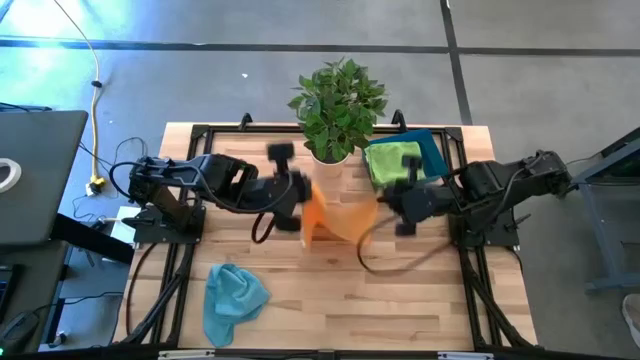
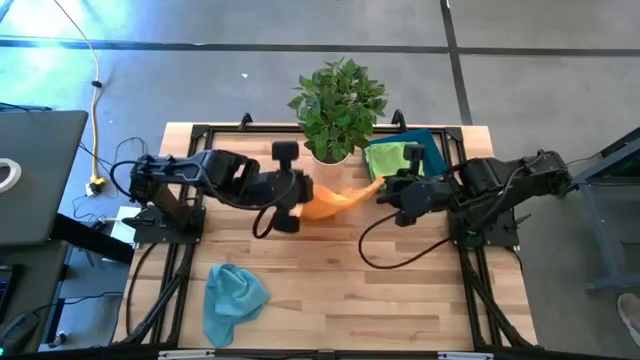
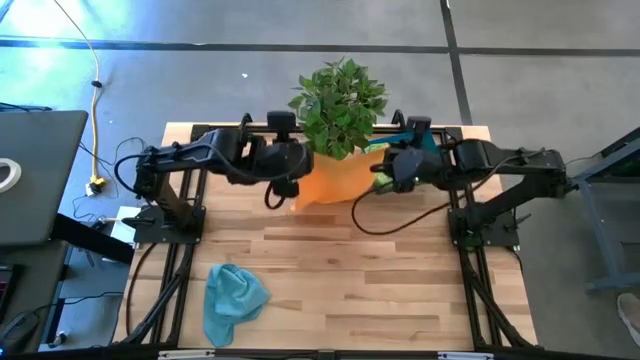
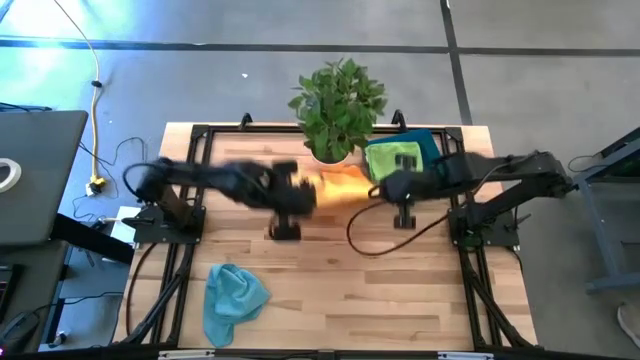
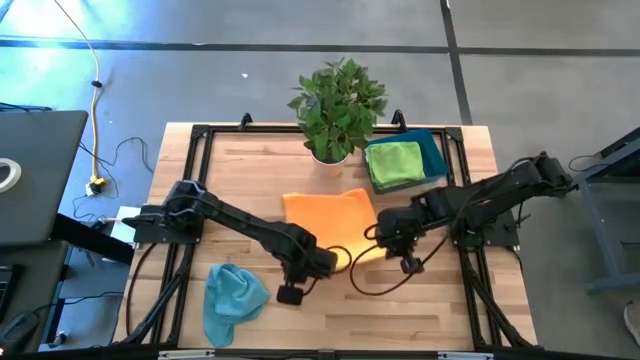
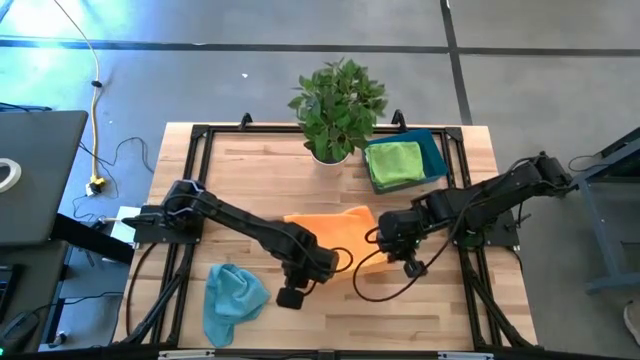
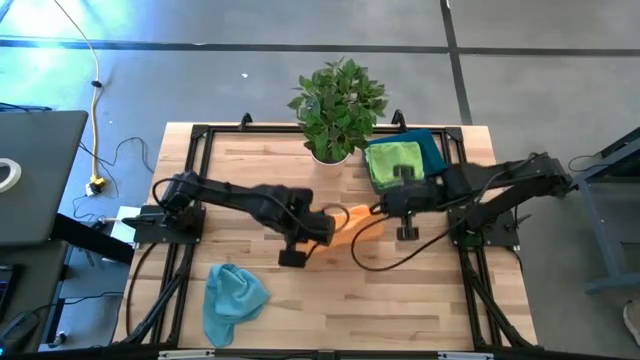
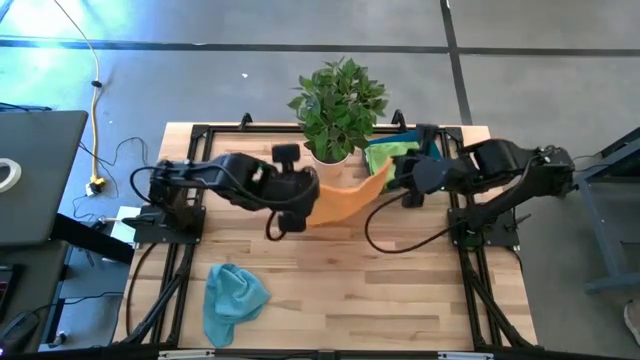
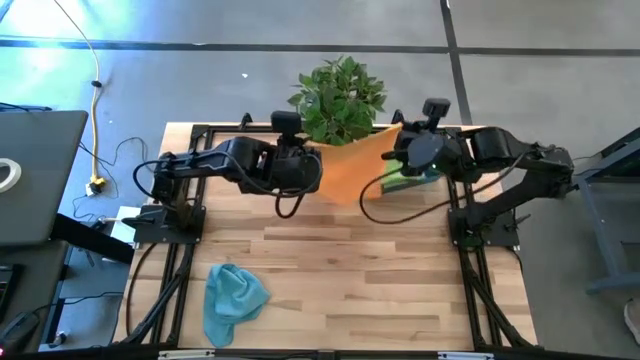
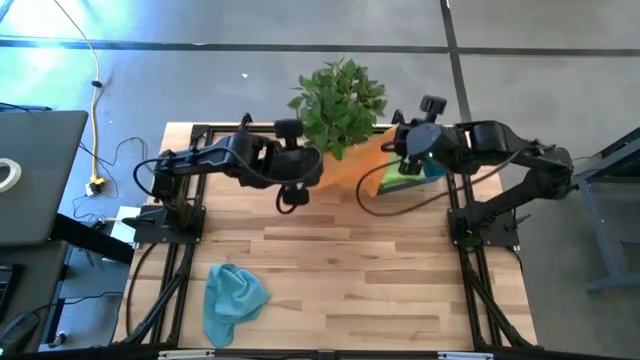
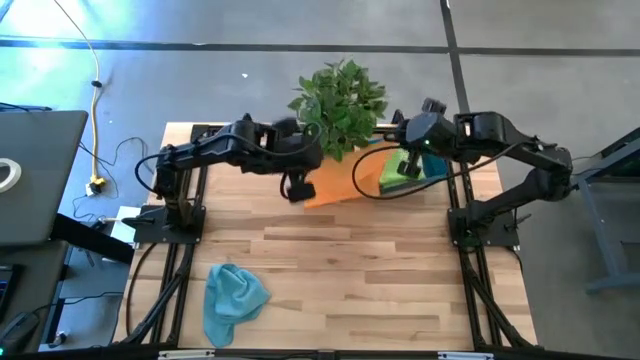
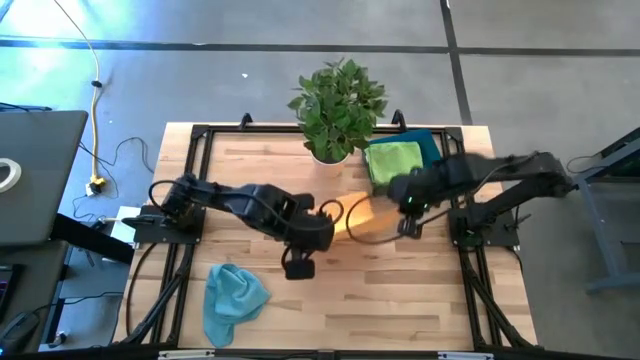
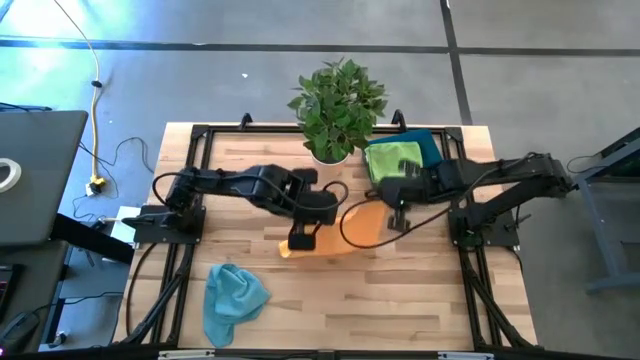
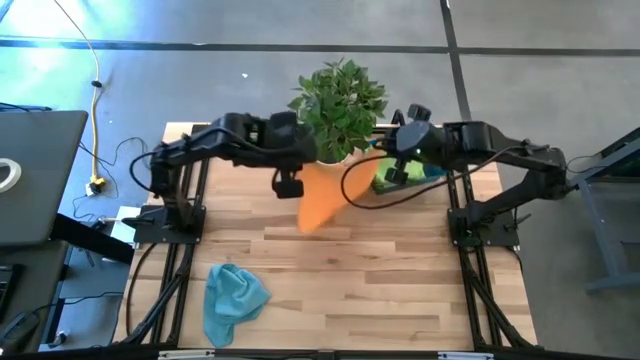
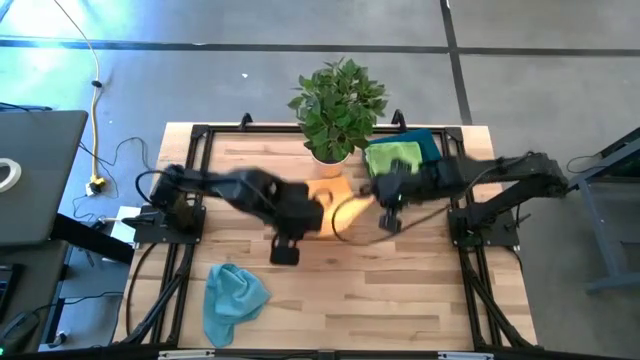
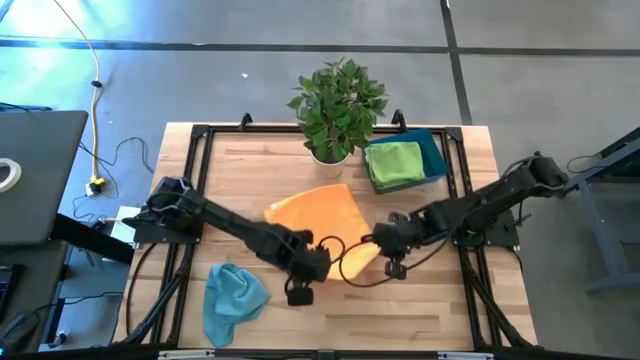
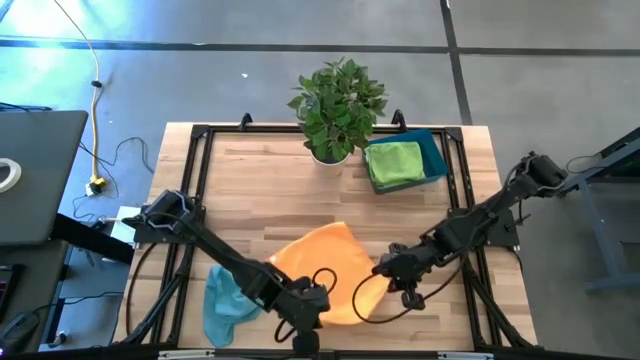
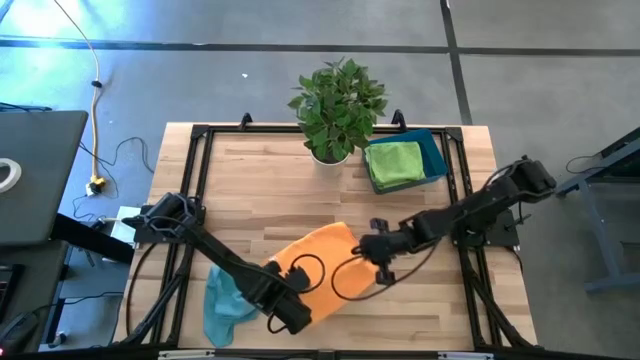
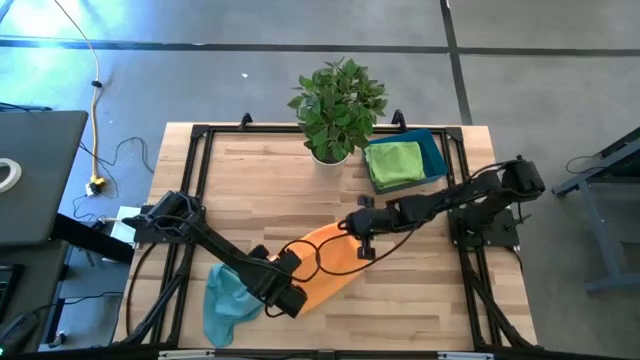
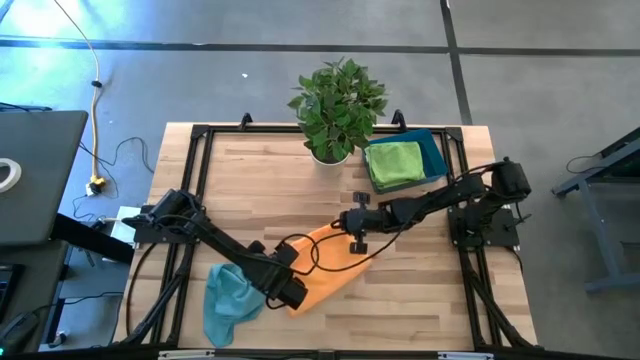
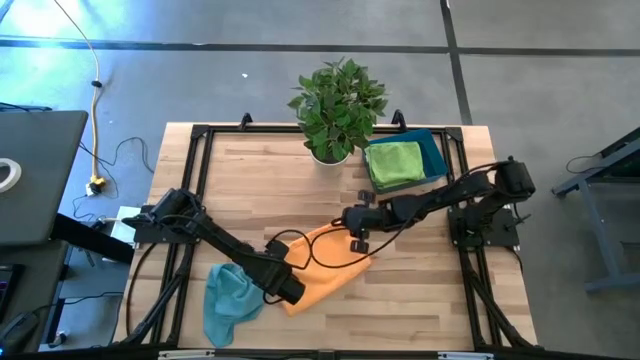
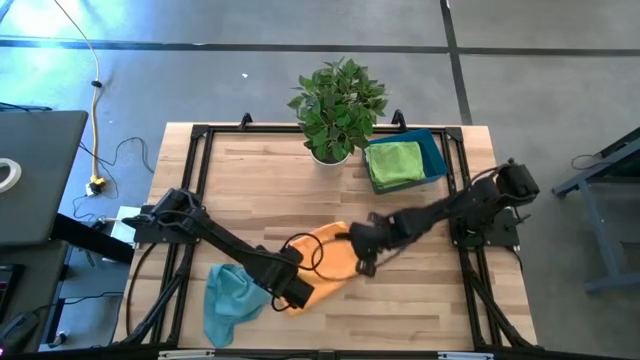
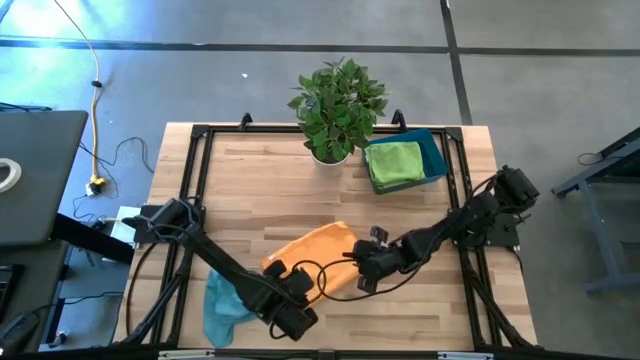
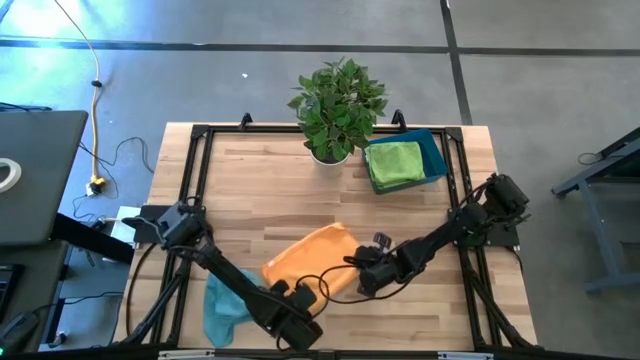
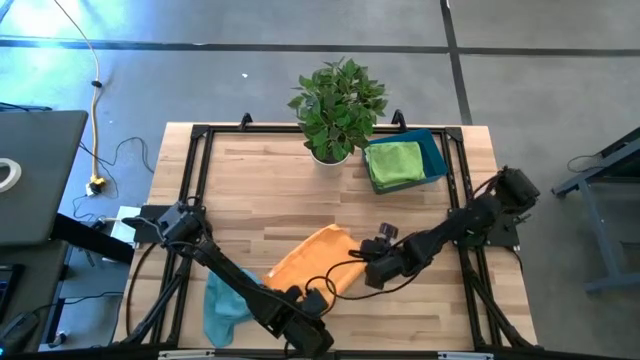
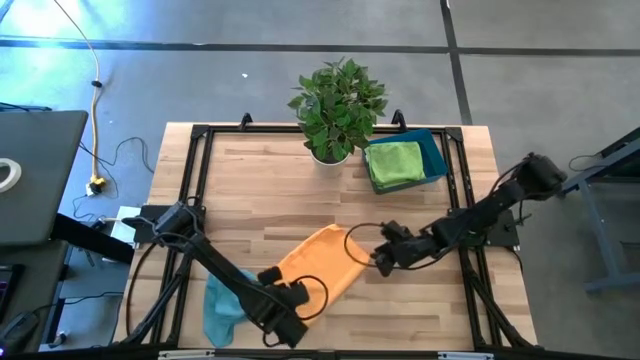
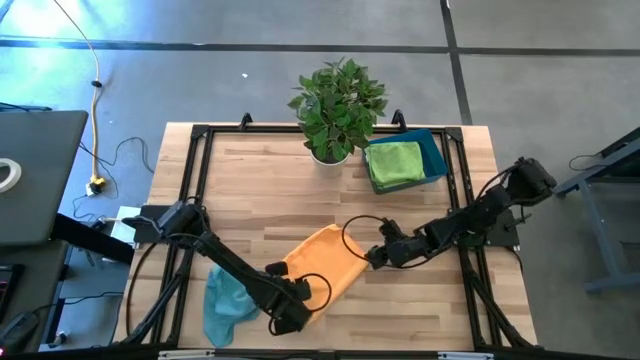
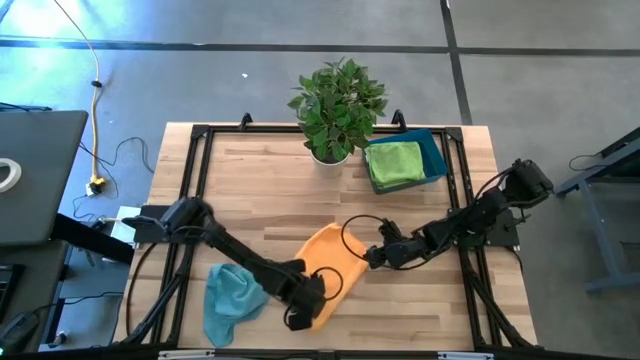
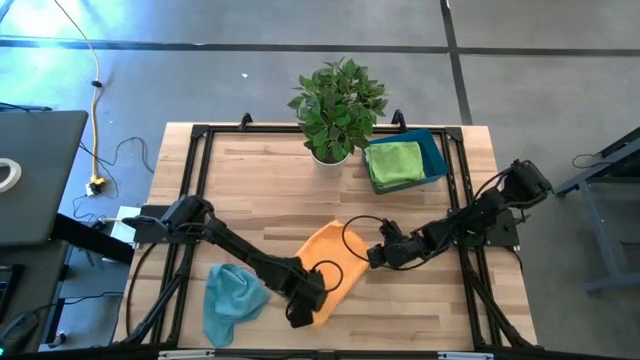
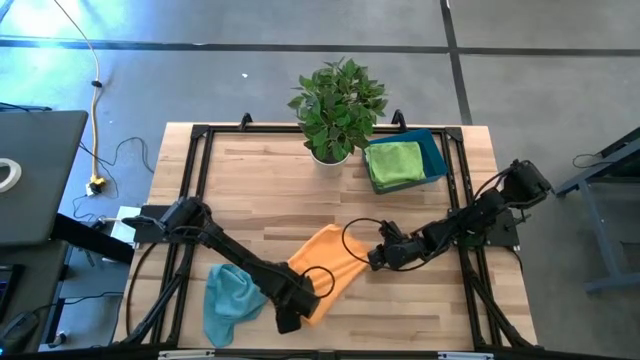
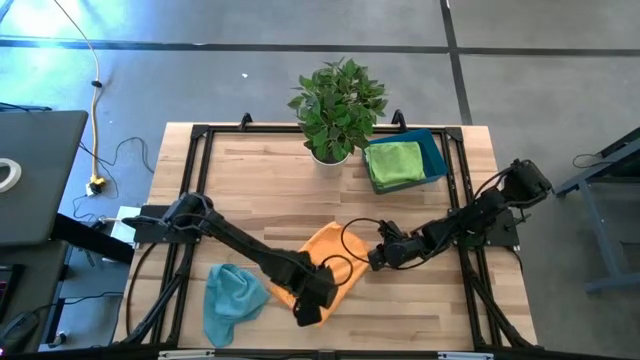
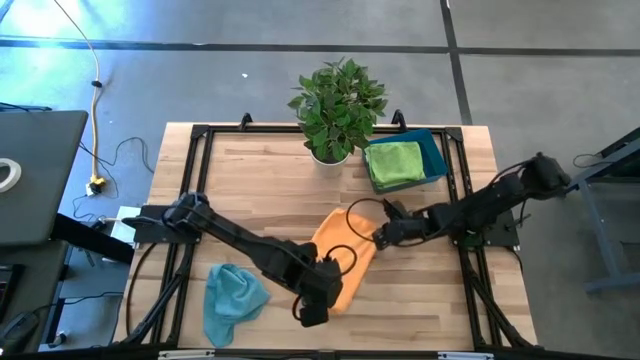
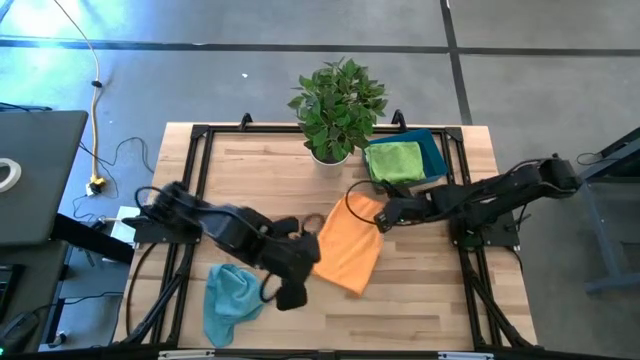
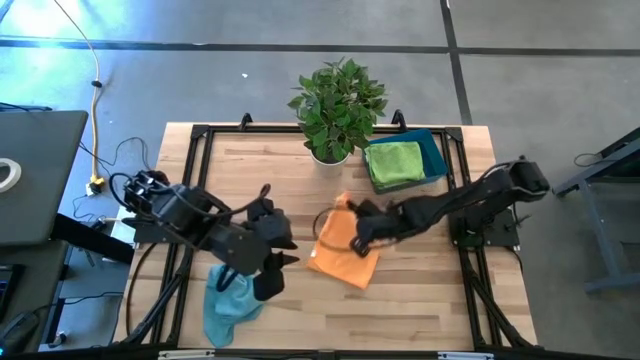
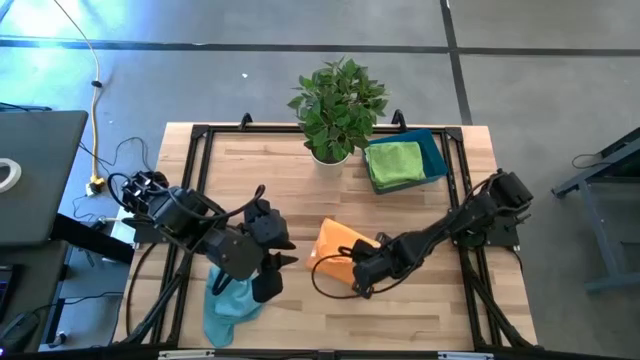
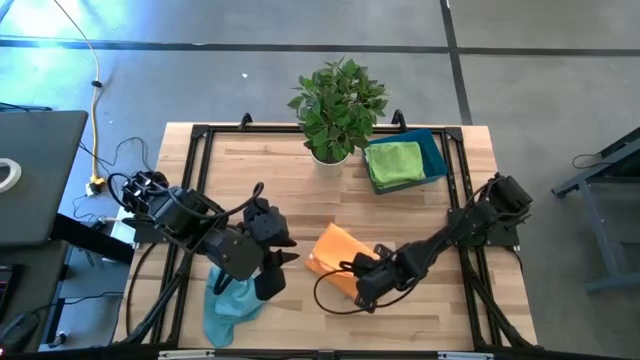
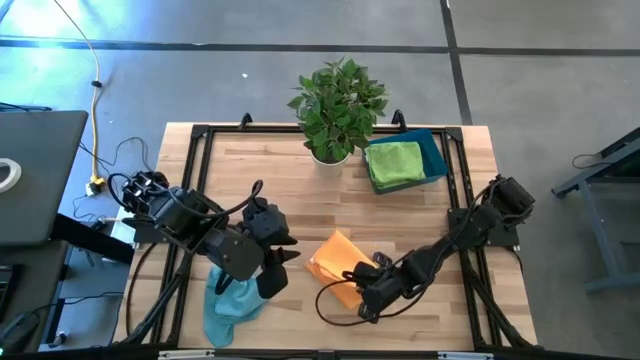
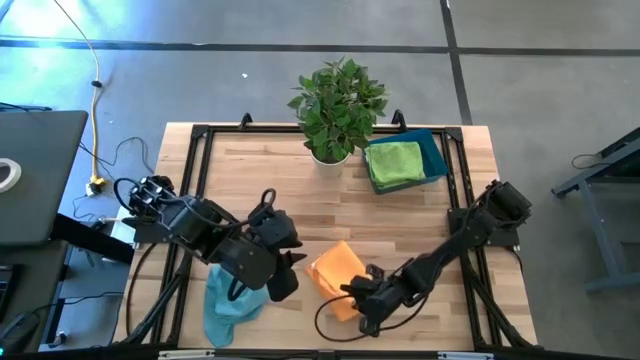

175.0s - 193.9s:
Task: Sort microfiber towel by color & place in baskets
Fold the orange towel

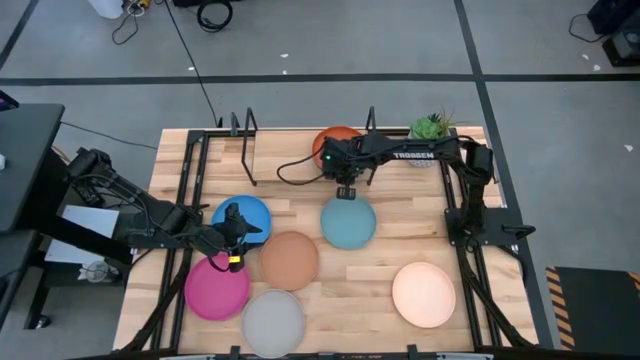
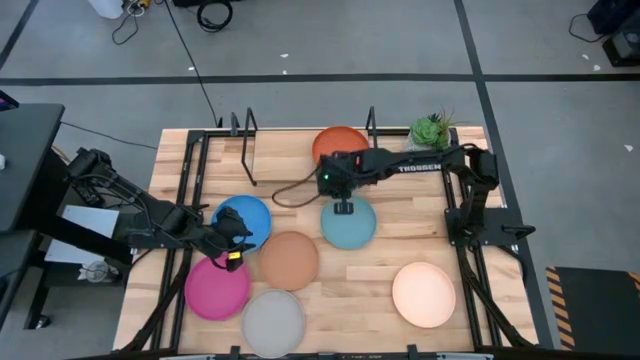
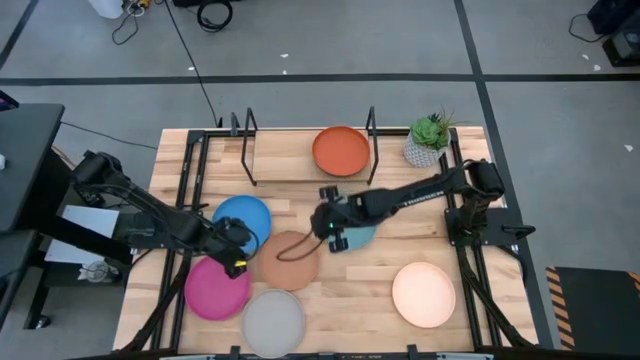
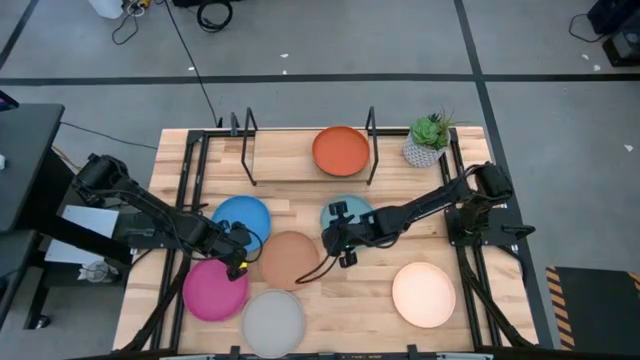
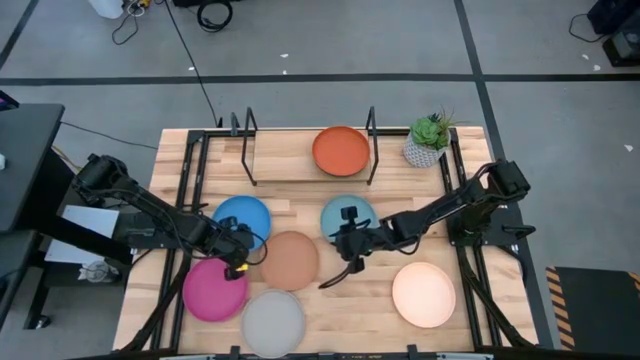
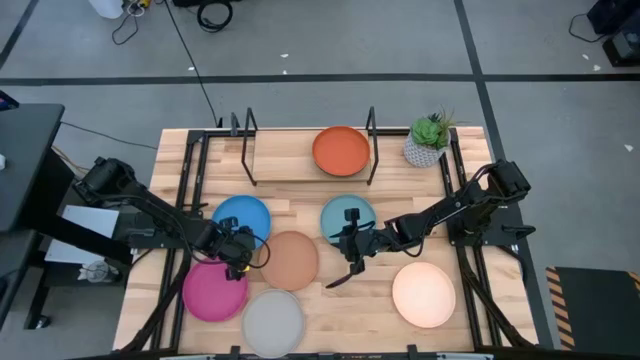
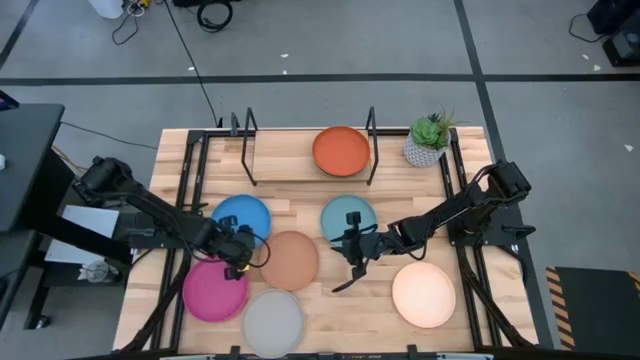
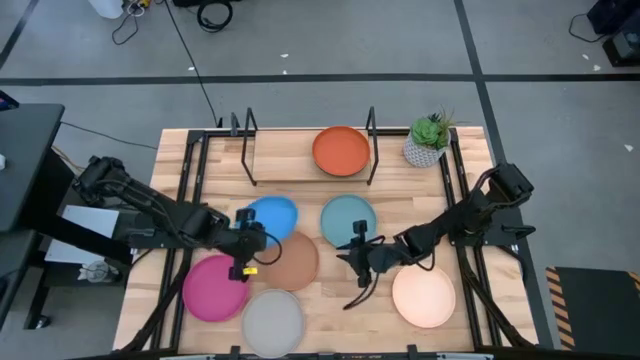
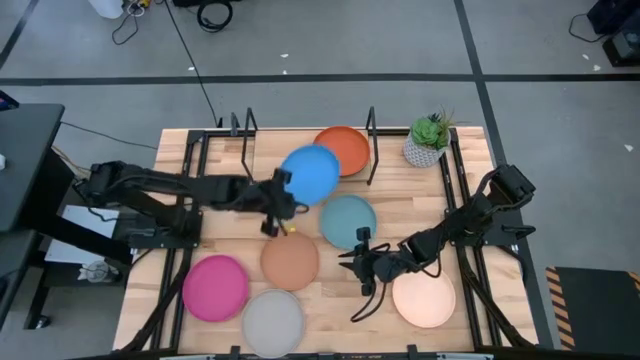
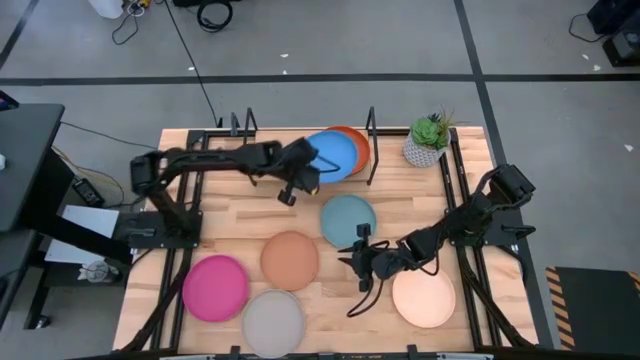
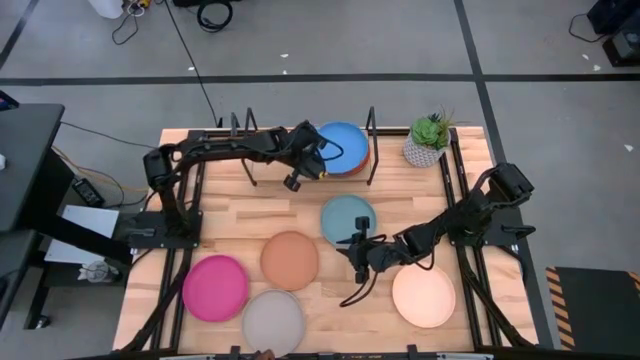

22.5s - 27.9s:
Task: Place and stack plates onto a shelf
Stack the blue plate on top of the orange plate on the shelf
